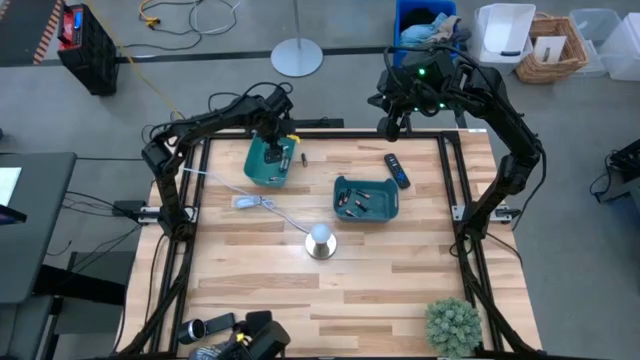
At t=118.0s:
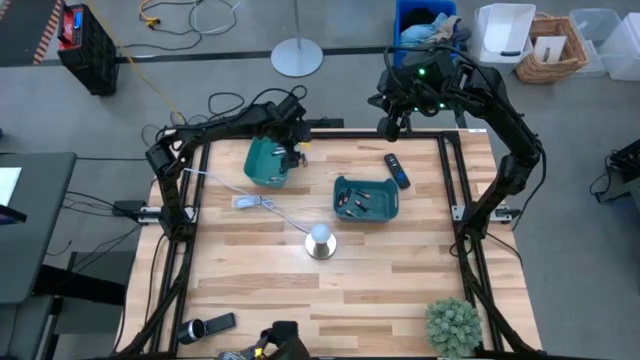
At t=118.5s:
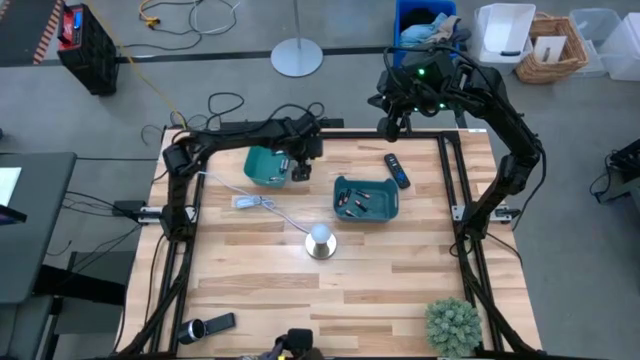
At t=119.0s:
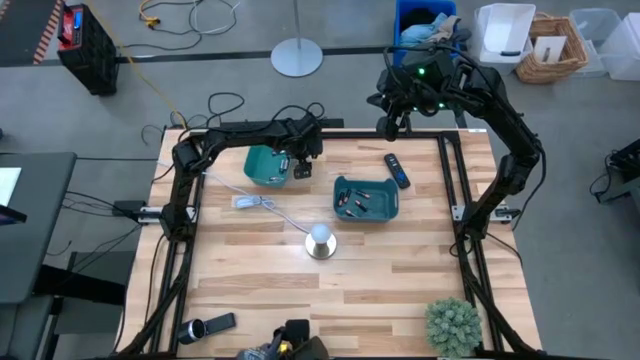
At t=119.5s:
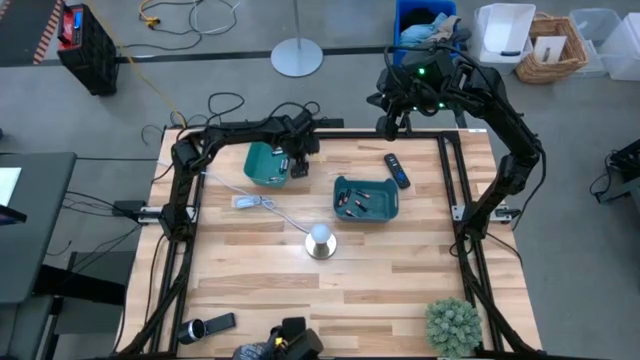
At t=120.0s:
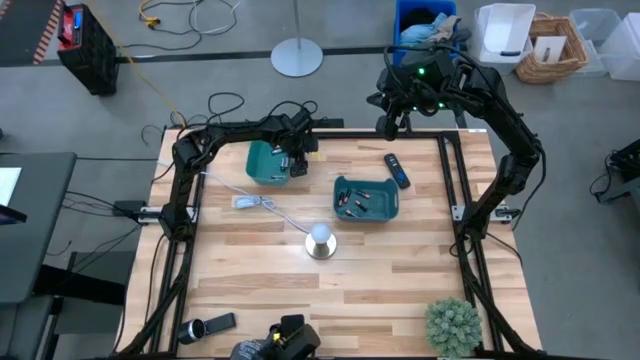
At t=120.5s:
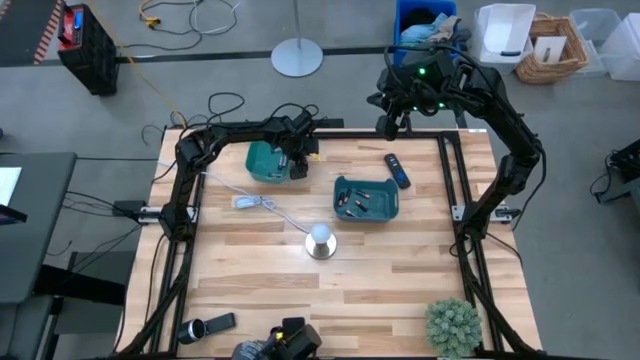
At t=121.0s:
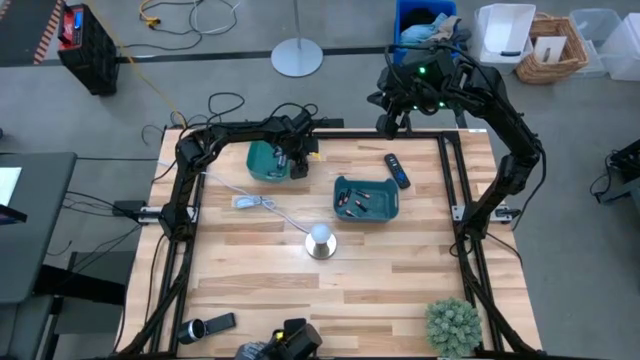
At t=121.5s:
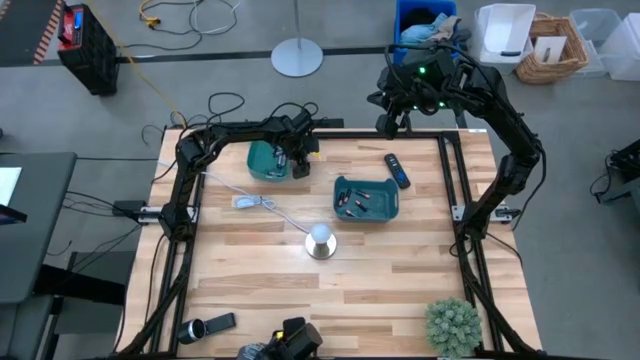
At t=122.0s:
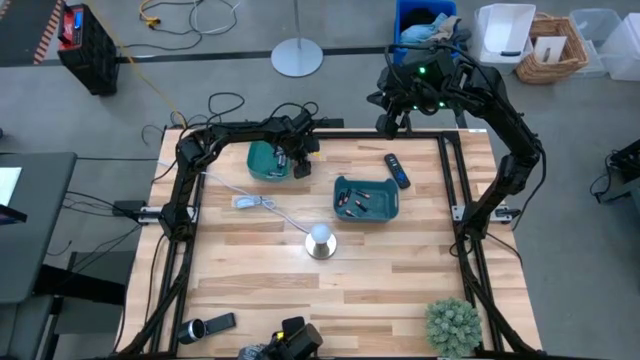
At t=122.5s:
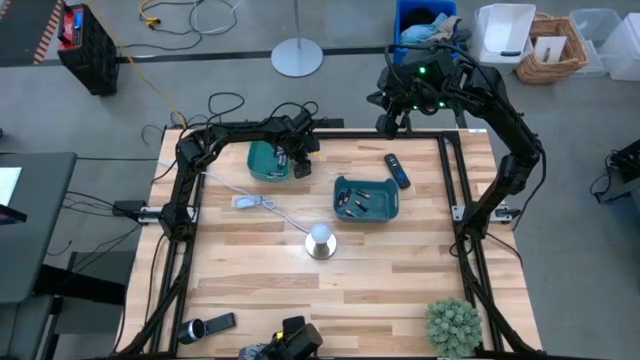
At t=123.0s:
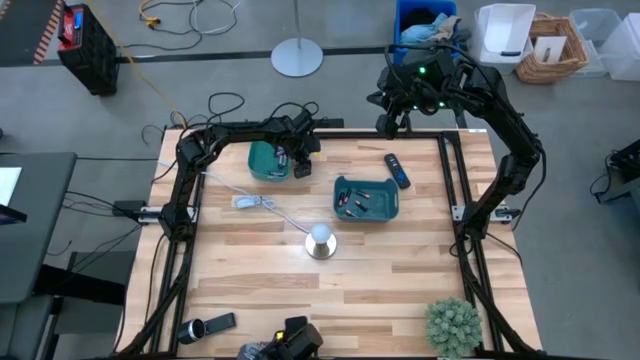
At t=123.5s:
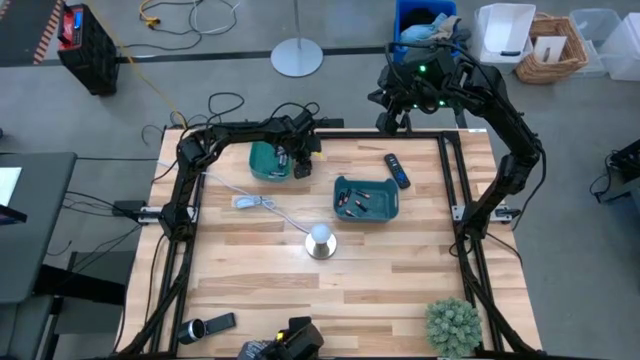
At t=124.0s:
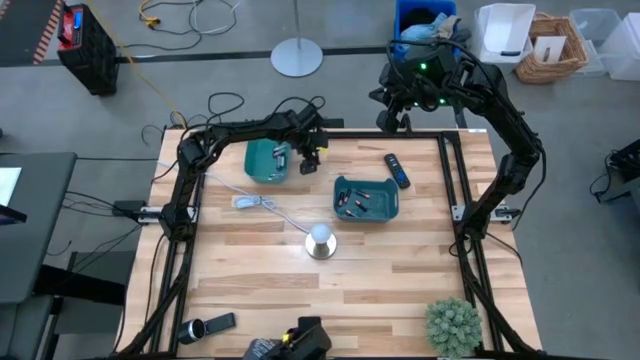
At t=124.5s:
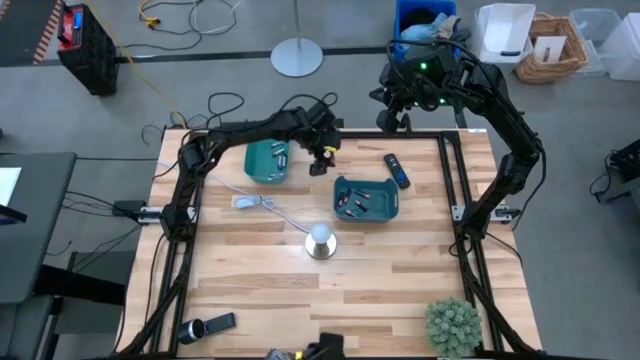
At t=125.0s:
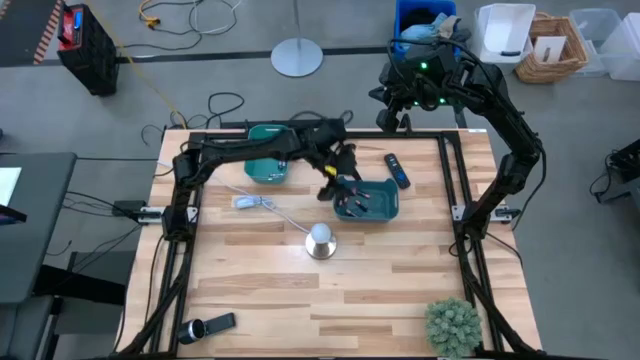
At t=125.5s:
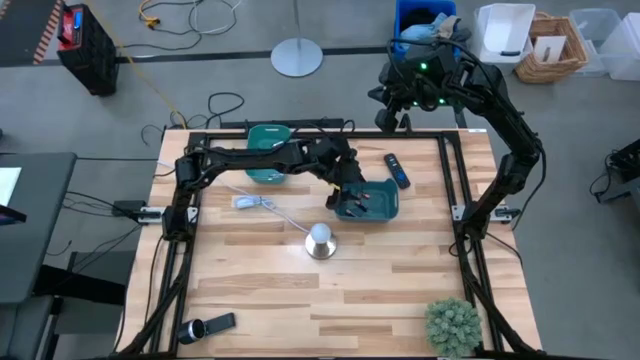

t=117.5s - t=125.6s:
Task: Sort batteries
Put the black battery into the blue bin

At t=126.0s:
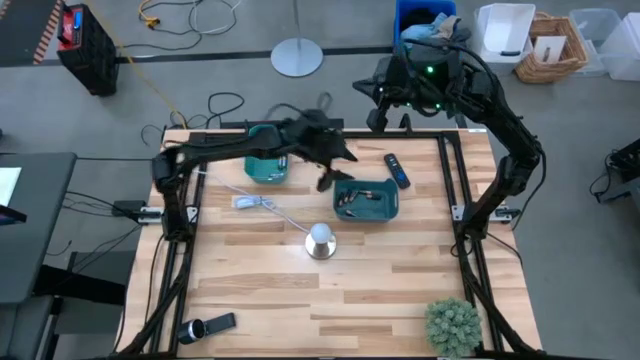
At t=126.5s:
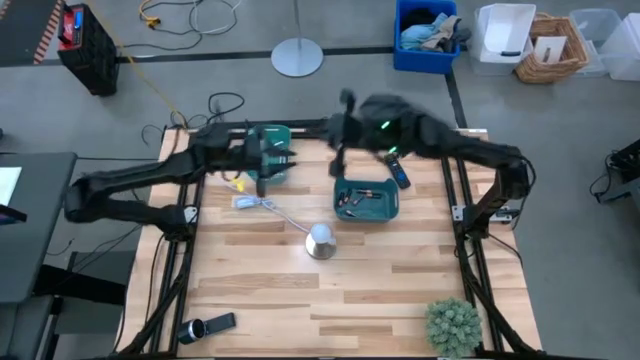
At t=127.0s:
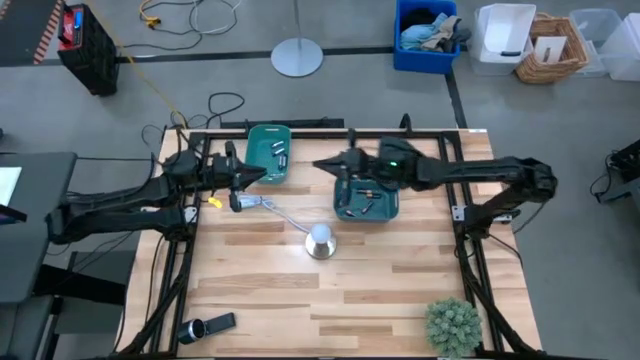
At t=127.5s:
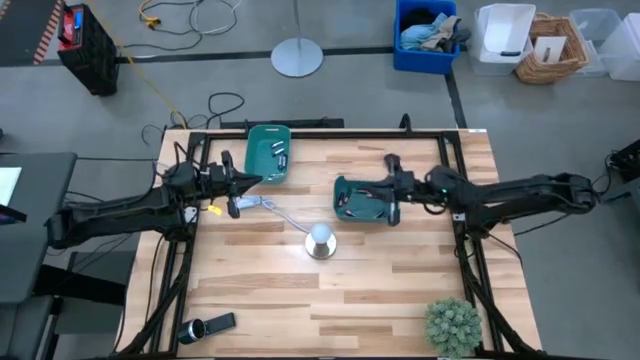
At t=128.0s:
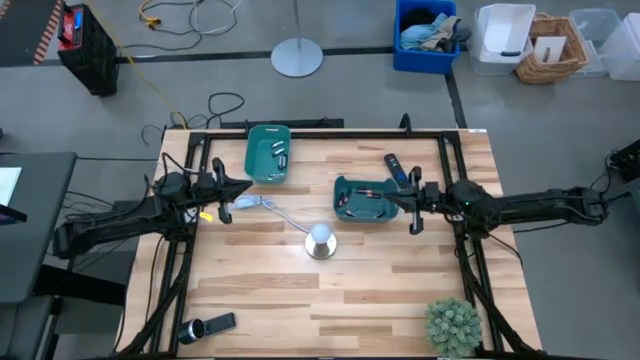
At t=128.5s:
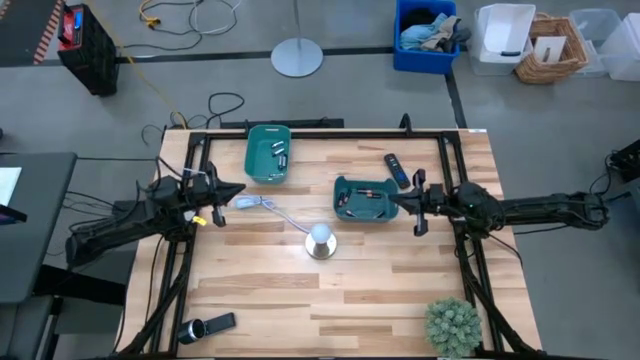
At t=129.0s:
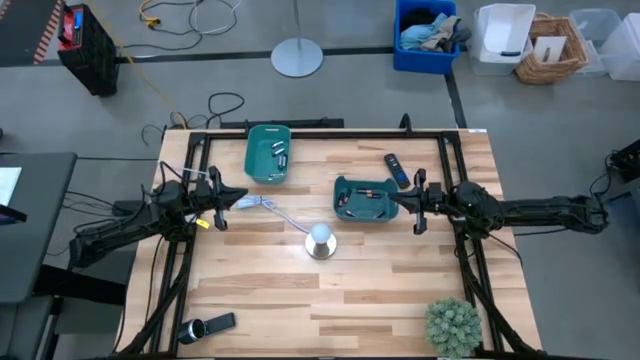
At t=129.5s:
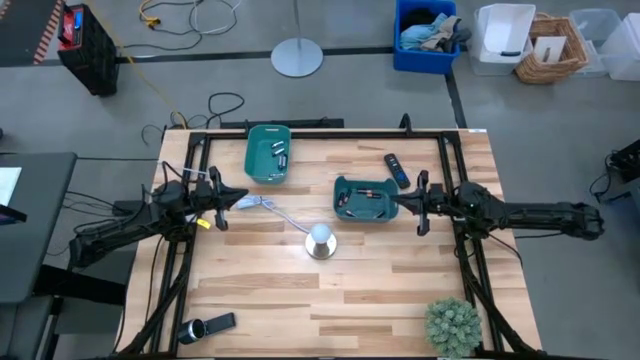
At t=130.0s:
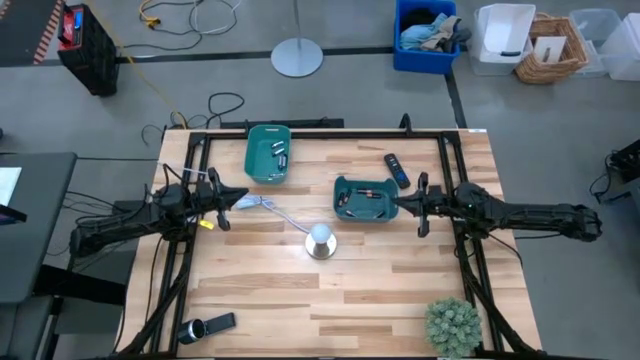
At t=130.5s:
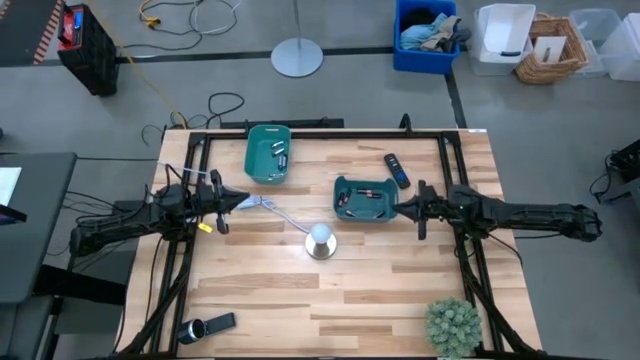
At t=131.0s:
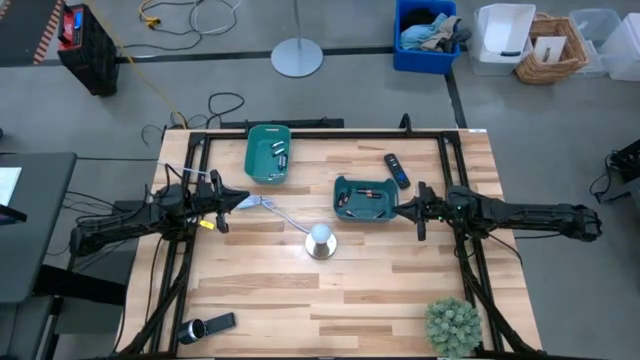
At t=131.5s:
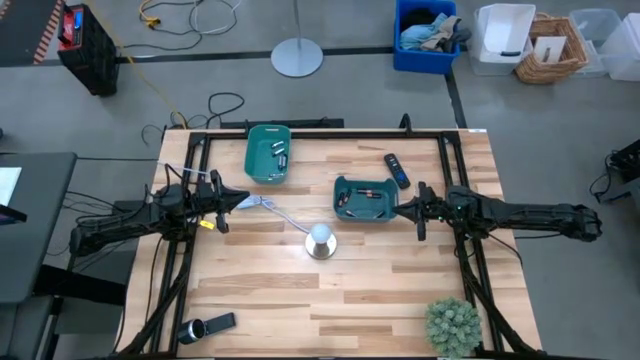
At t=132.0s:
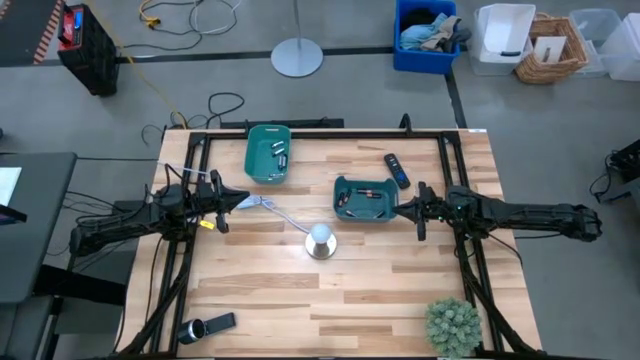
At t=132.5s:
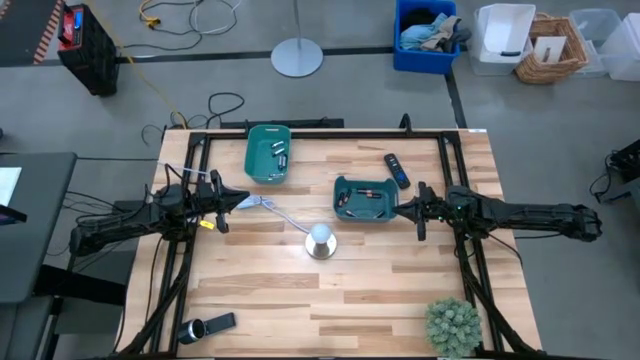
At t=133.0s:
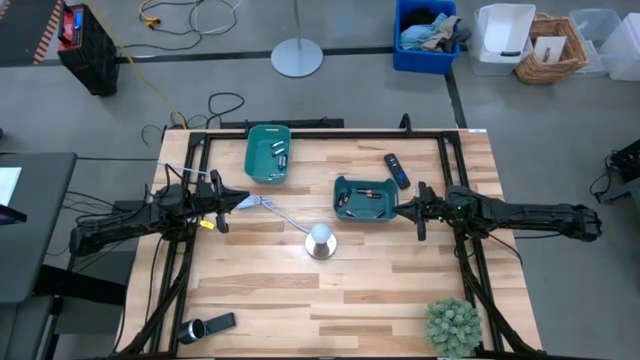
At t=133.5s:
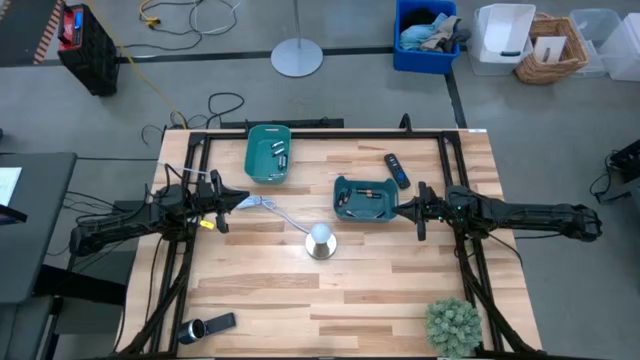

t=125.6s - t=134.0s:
Return to Home Position

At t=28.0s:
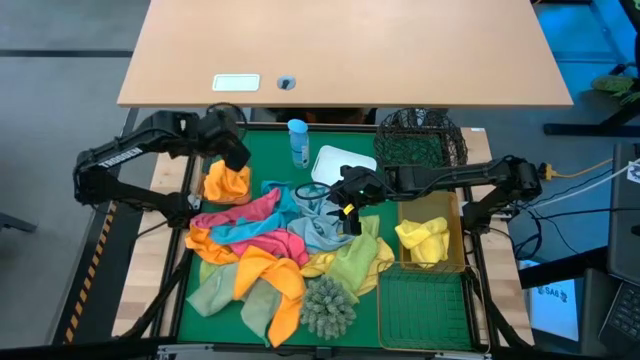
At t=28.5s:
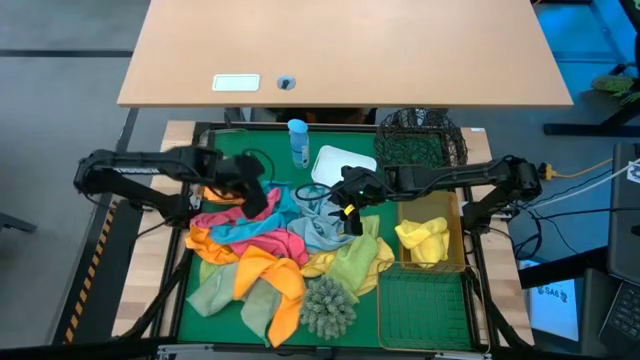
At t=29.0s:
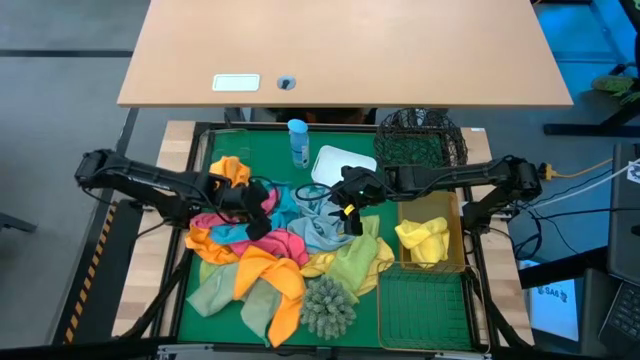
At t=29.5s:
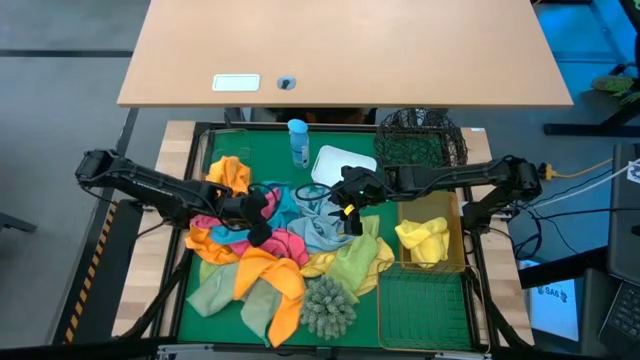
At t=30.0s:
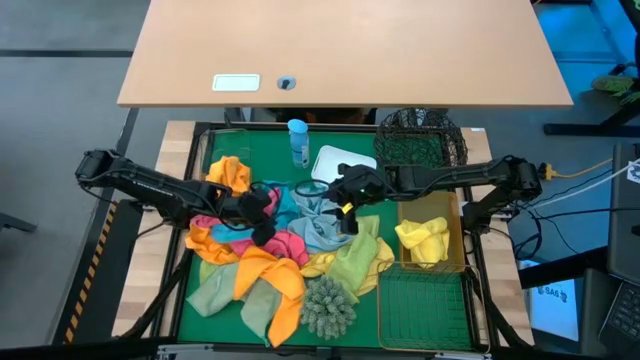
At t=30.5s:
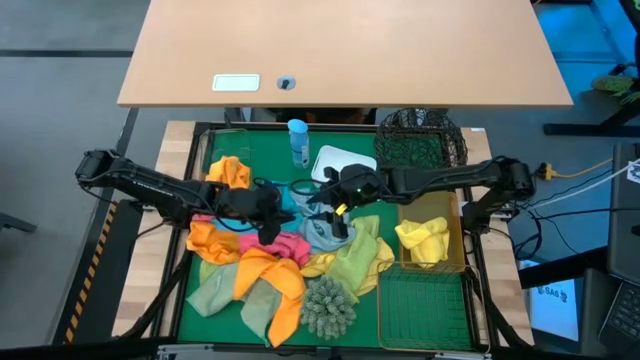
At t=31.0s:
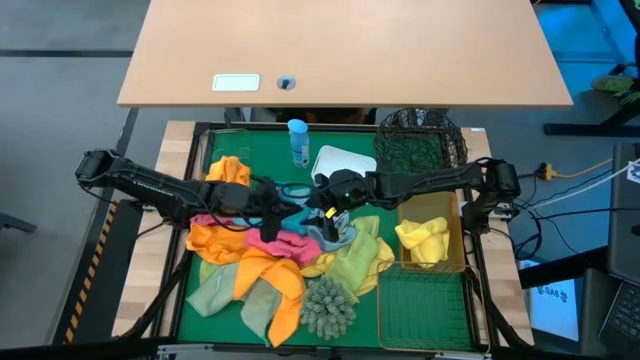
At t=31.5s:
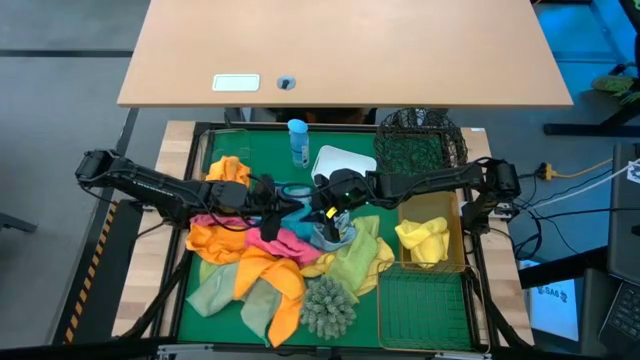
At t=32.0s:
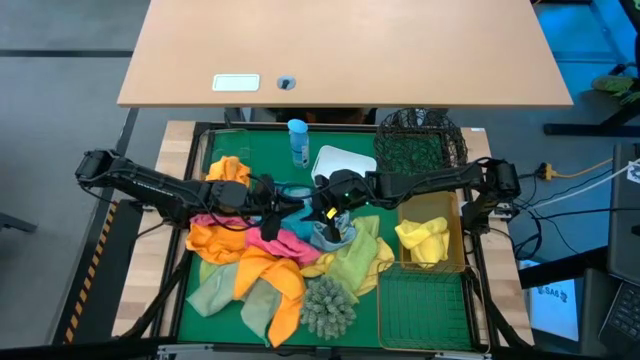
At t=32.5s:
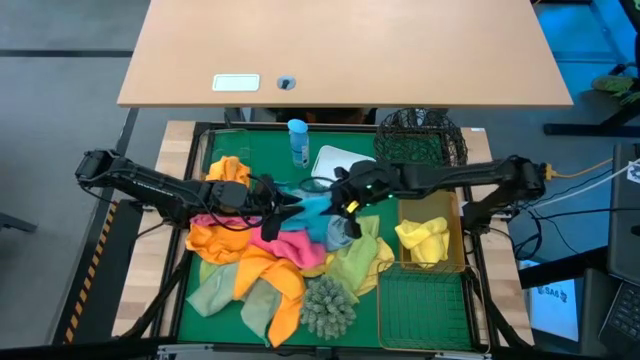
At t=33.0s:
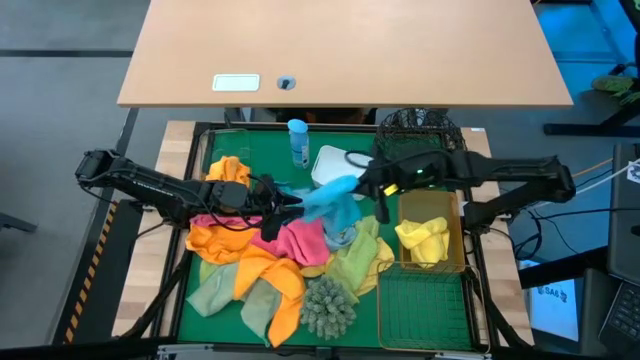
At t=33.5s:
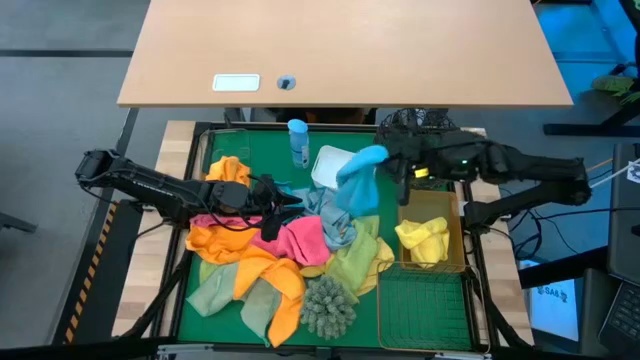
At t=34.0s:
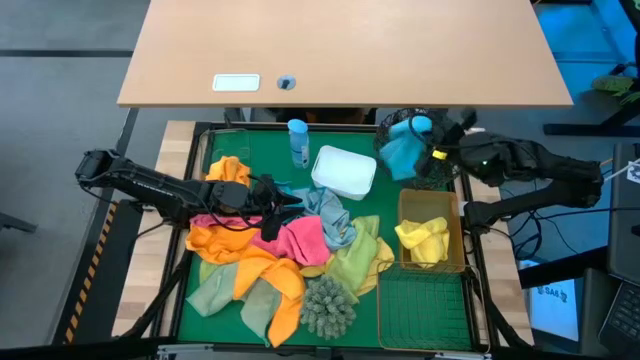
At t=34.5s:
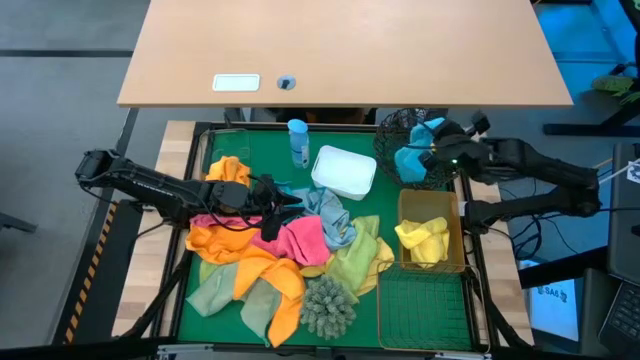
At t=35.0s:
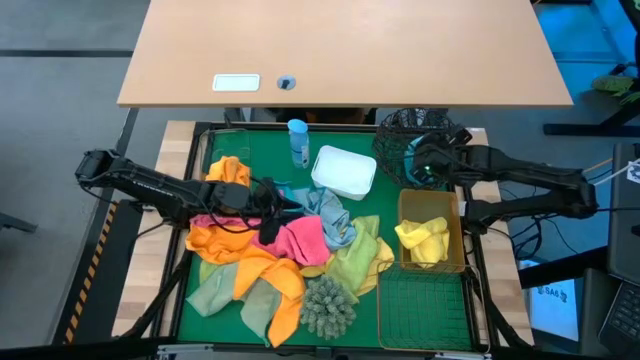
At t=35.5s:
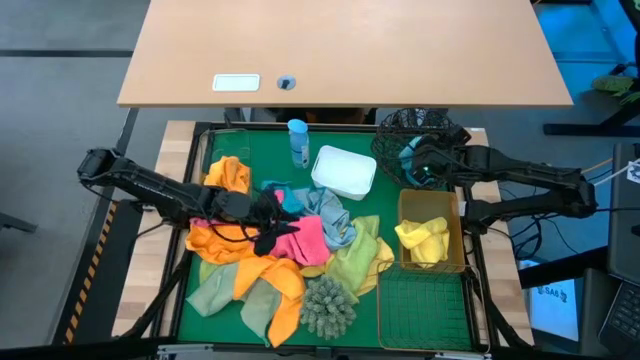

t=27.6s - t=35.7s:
Task: Sort microfiber towel by color & place in baskets
Put the blue microfiber towel into the circular wire basket
